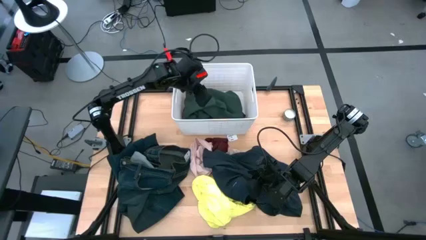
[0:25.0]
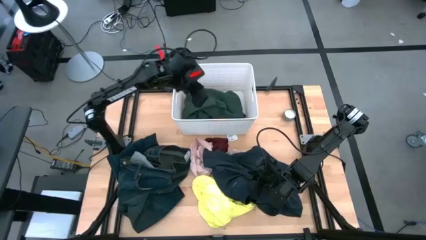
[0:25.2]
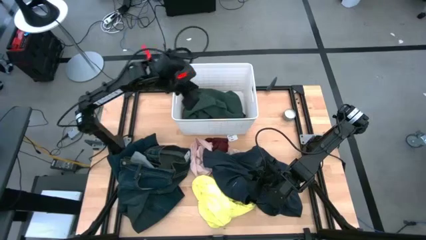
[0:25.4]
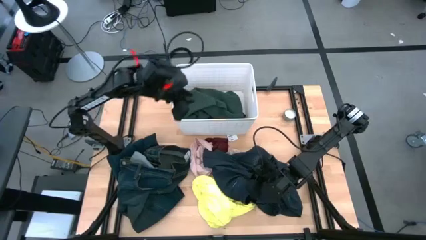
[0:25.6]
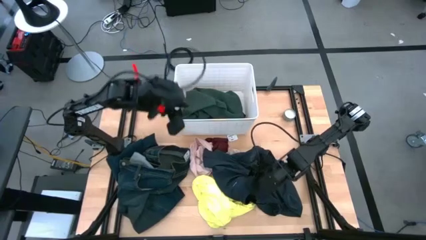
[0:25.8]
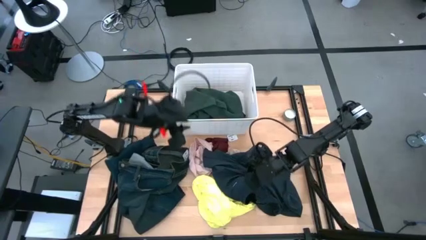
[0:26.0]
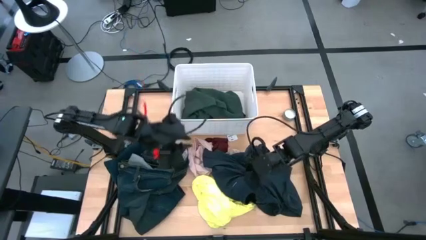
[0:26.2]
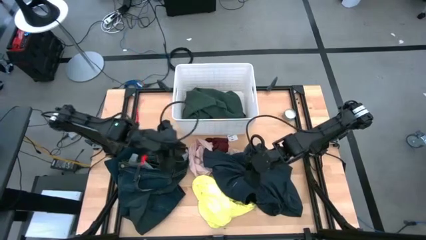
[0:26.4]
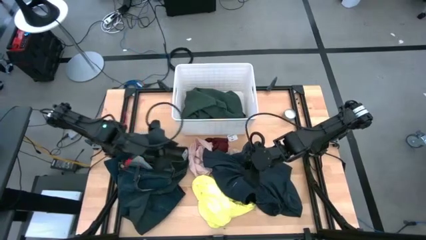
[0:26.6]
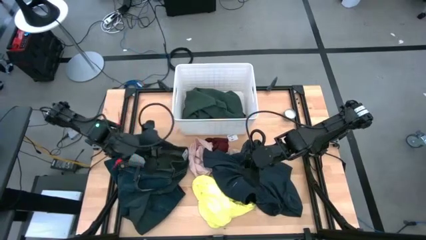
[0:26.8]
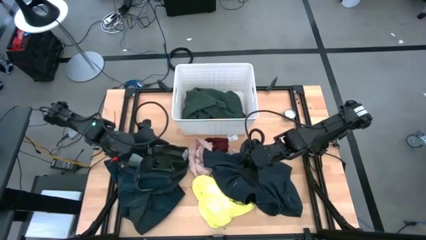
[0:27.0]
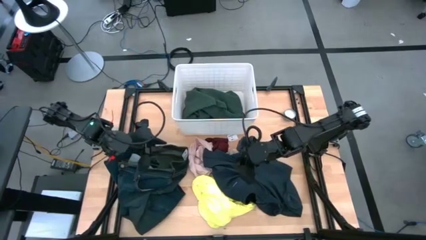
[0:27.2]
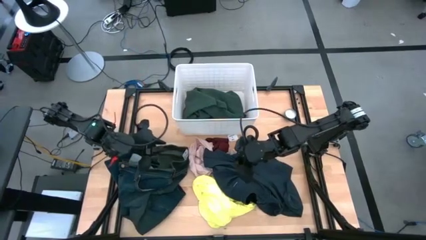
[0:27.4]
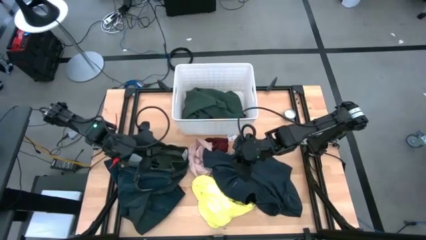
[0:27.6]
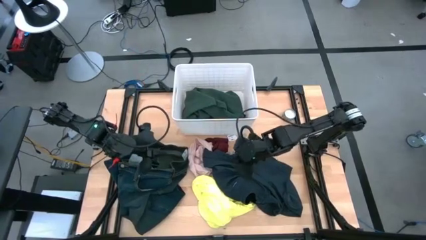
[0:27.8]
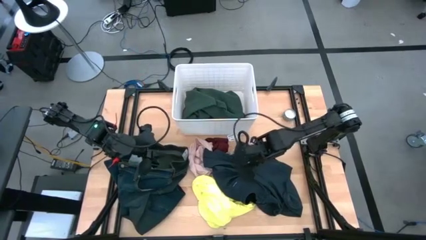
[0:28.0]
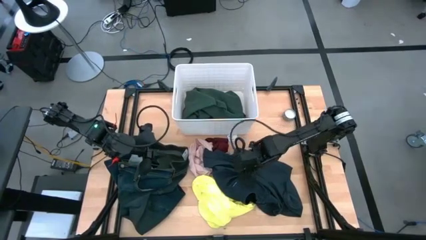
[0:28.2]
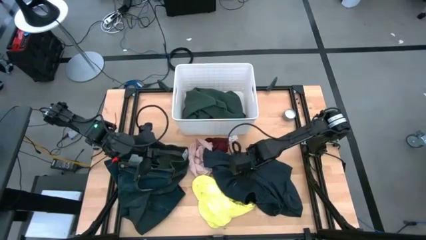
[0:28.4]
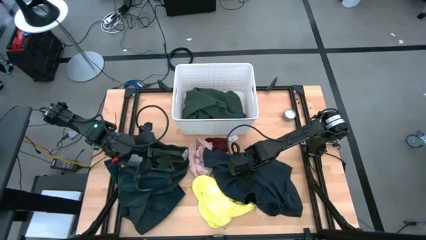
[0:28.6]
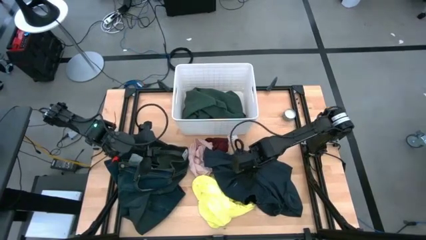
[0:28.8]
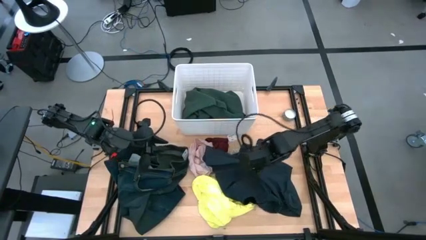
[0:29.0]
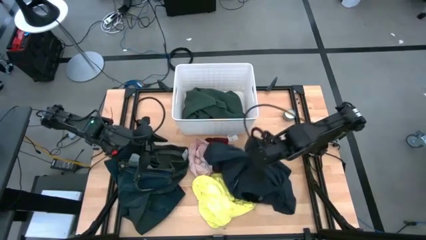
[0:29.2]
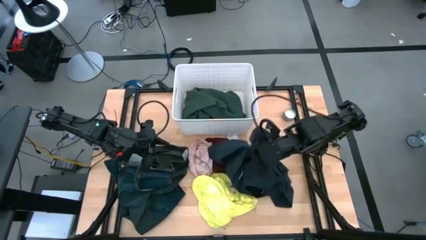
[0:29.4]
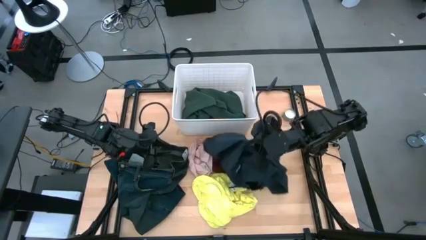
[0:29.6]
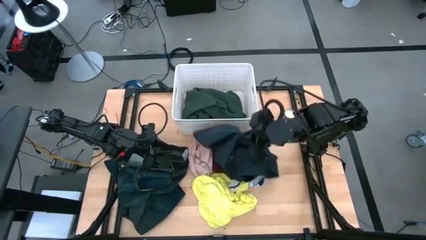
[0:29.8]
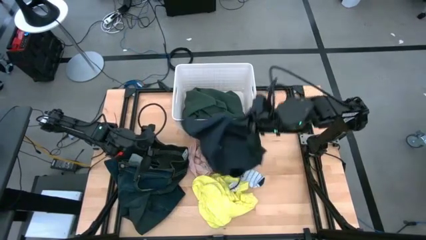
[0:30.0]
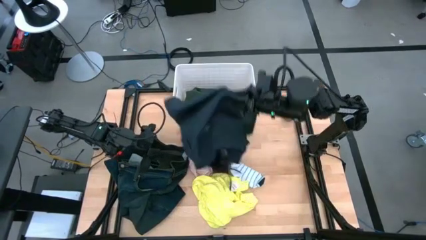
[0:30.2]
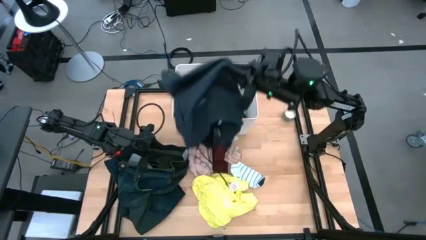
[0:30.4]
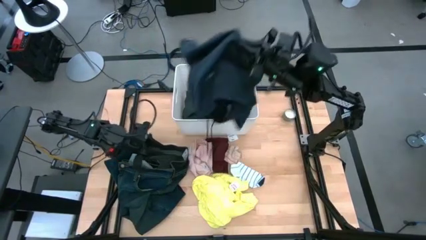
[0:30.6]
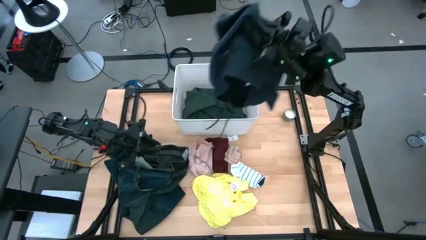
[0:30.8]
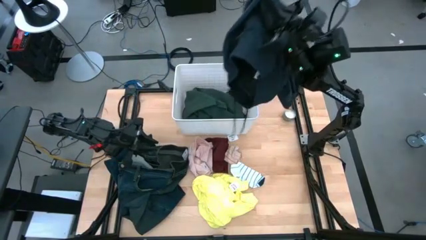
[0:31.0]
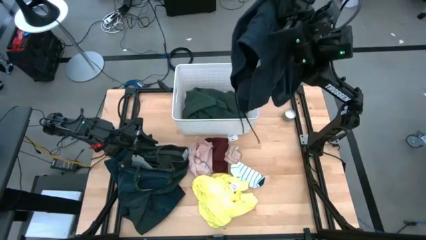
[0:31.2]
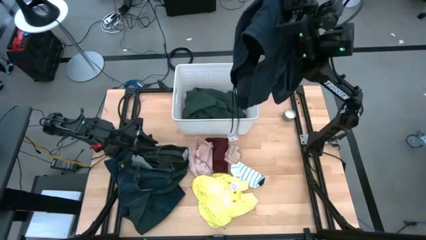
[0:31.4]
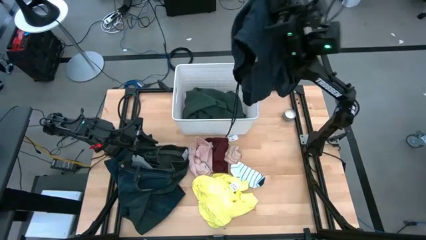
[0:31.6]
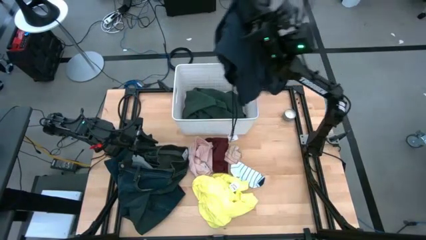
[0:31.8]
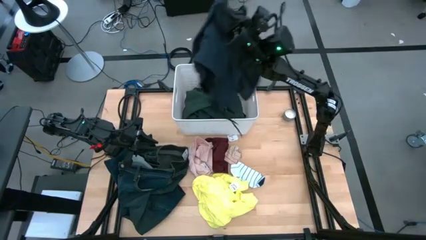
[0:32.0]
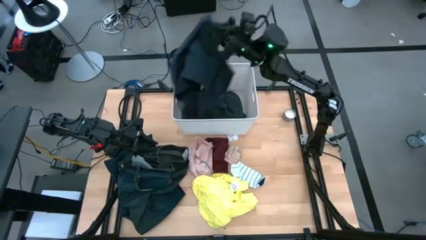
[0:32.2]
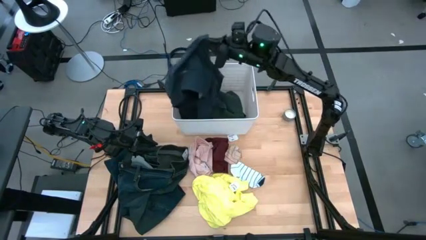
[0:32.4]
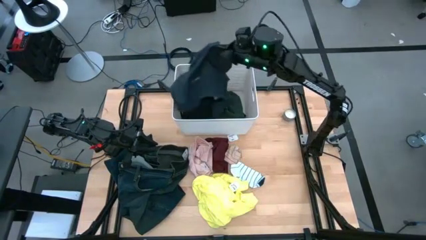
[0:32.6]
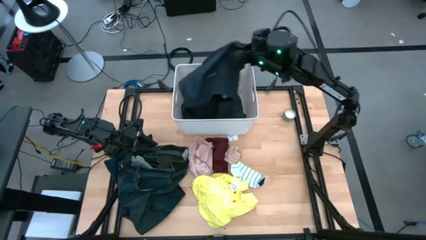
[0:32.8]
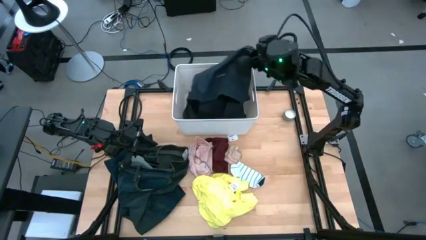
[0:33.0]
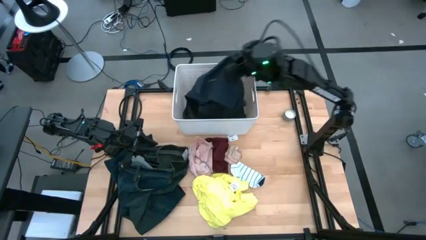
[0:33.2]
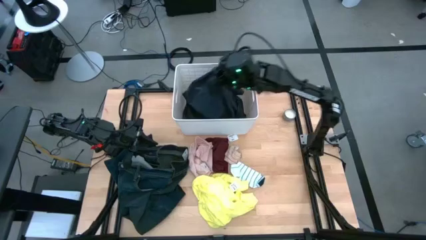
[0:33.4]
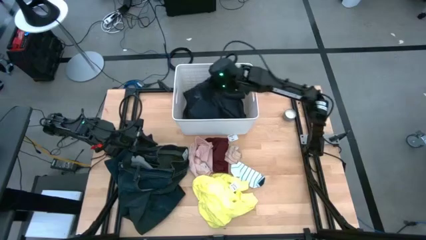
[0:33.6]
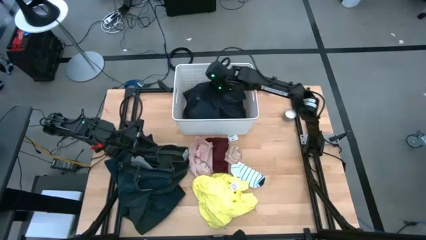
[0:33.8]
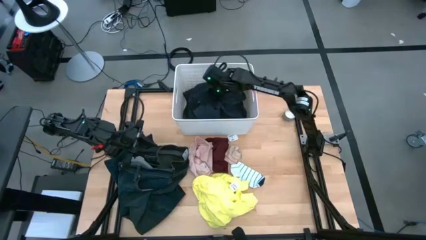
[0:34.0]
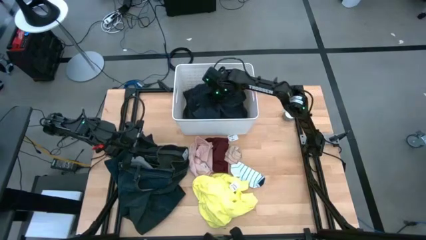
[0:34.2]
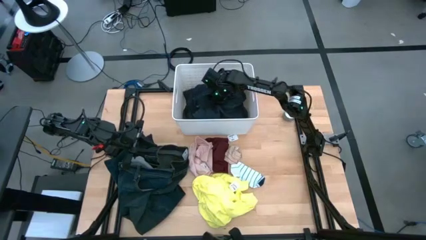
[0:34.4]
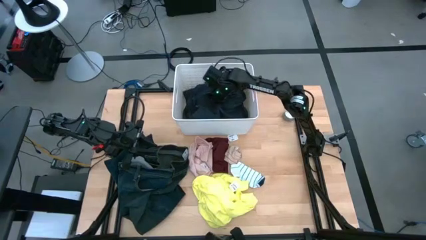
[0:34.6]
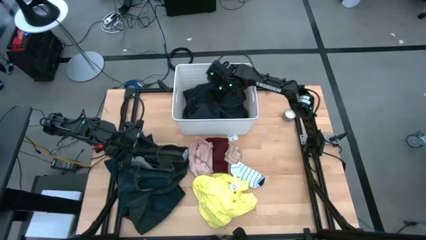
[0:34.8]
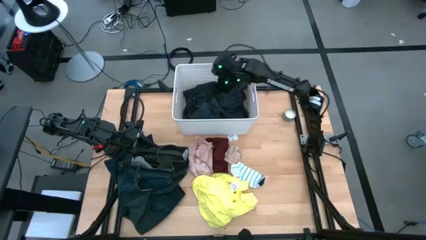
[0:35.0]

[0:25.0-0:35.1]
Task: Sort clothes
Put the dark blue shorts into the white bin

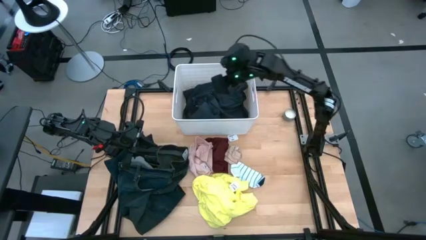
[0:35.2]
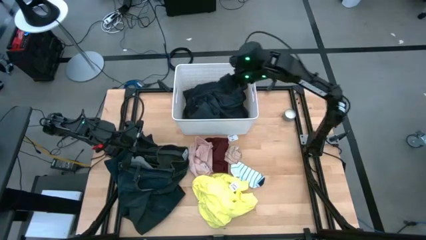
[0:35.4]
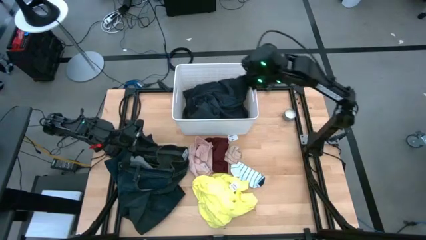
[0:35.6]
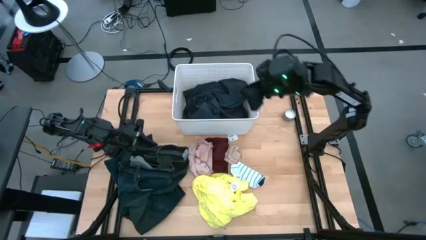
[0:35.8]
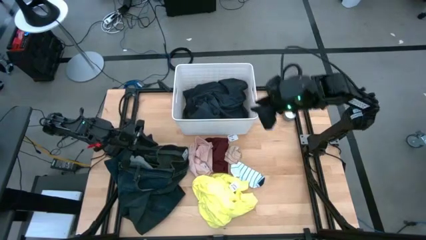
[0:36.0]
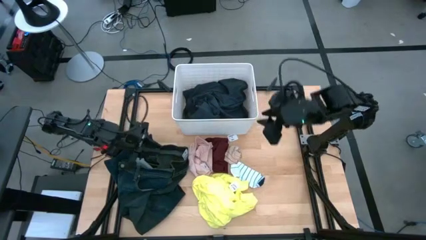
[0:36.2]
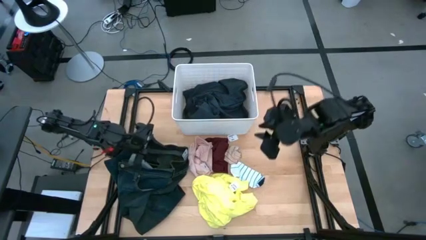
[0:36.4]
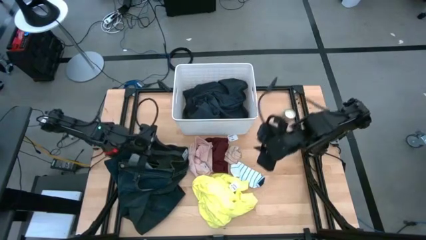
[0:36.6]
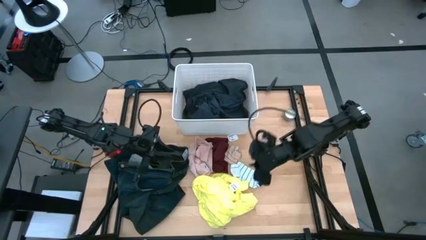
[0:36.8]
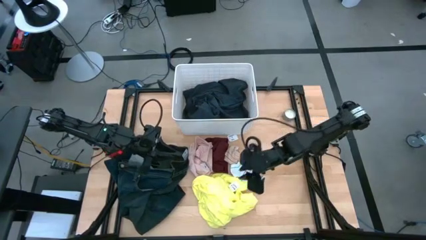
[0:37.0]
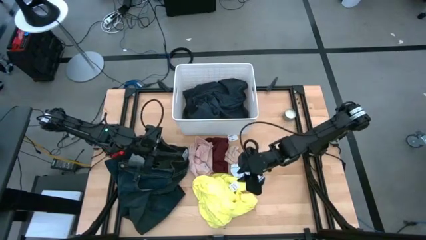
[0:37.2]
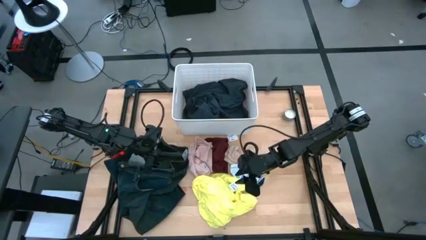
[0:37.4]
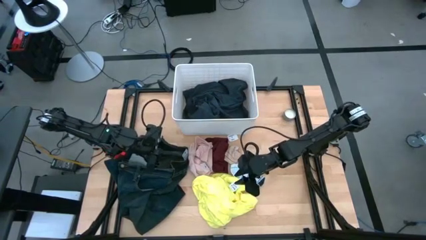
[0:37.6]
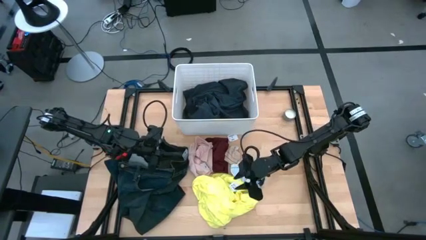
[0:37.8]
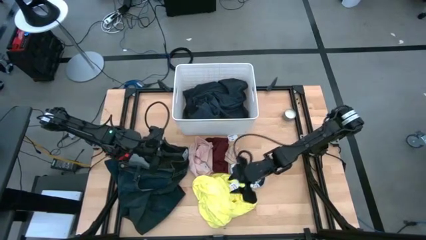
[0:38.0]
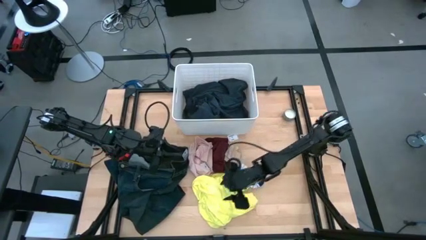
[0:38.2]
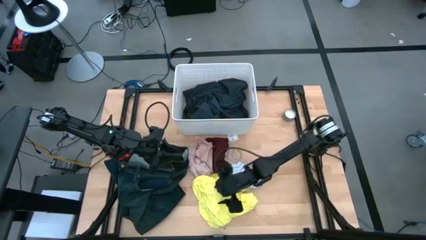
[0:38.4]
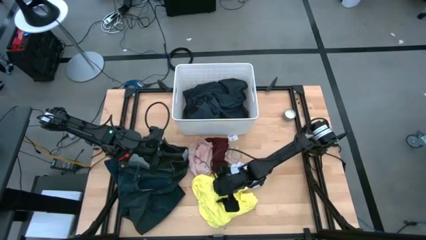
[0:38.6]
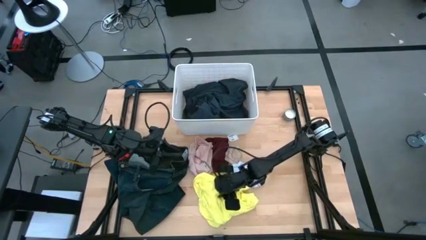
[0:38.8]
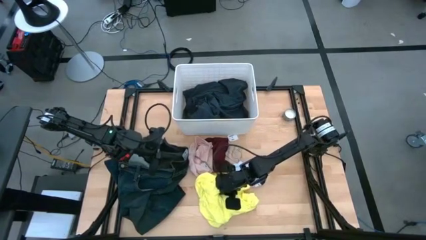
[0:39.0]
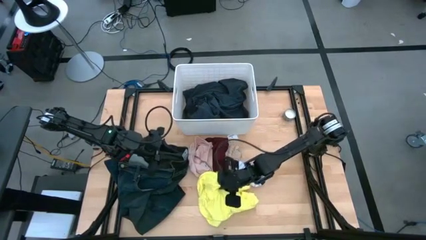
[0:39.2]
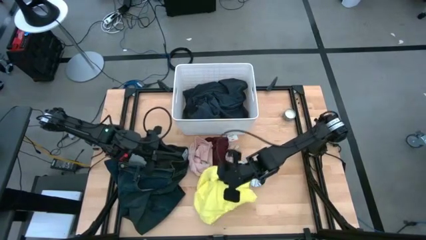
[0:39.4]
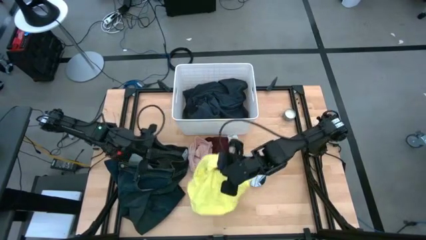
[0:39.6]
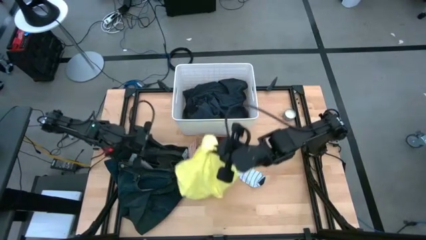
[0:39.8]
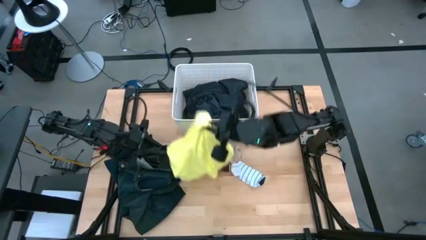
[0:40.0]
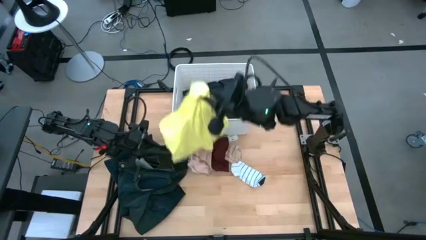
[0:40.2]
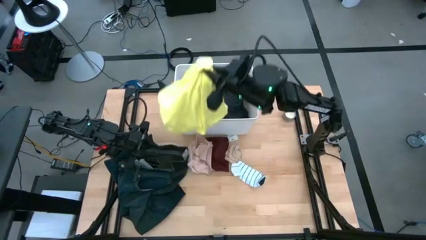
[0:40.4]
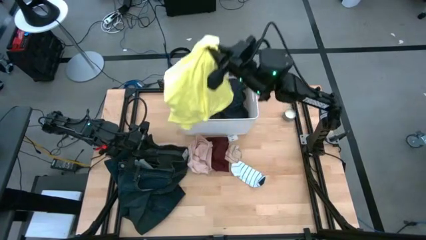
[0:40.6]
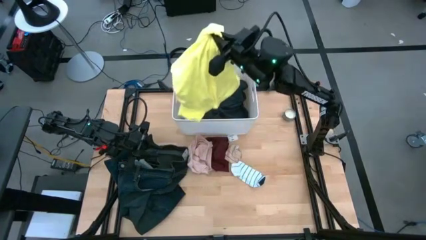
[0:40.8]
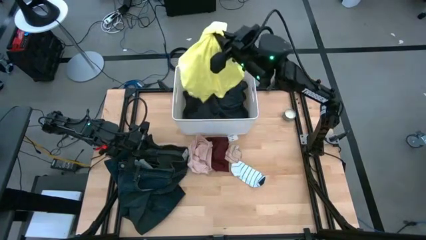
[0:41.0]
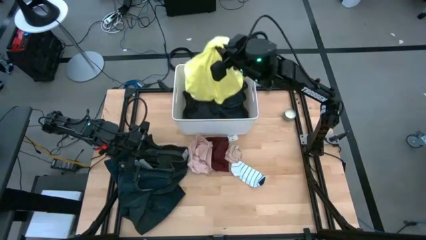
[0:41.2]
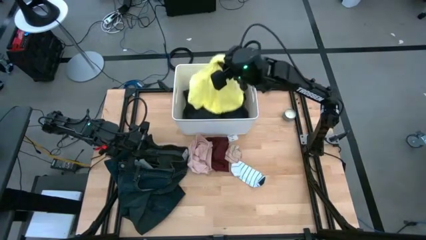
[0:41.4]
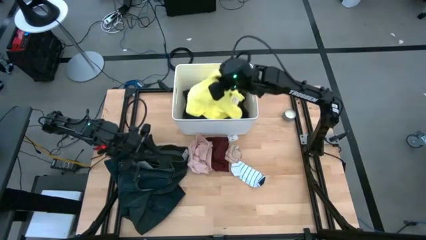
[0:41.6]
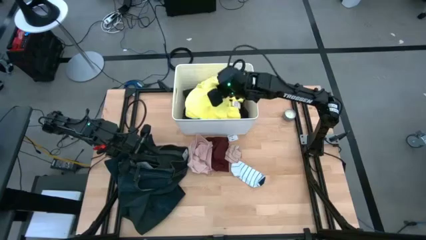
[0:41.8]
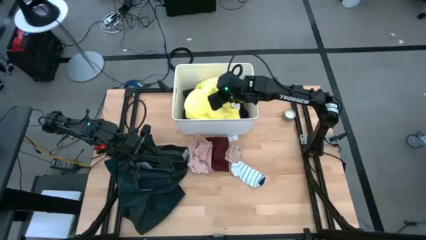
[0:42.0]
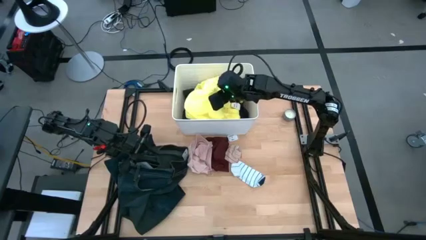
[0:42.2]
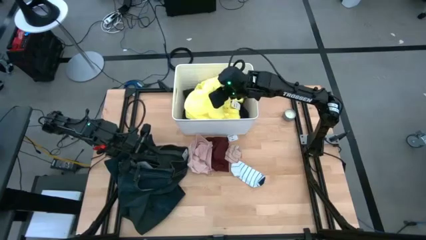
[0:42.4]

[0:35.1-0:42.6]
Put the yellow shirt into the white bin
